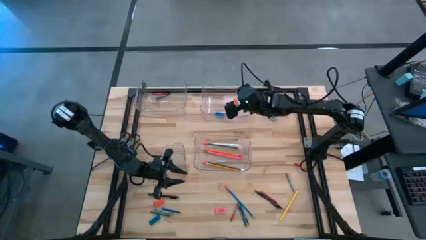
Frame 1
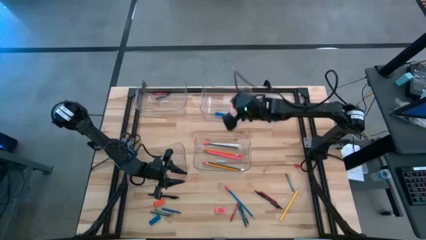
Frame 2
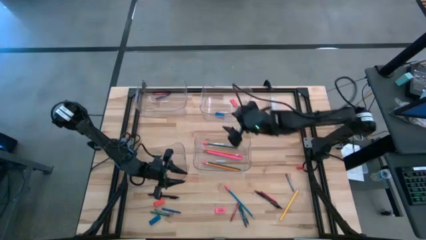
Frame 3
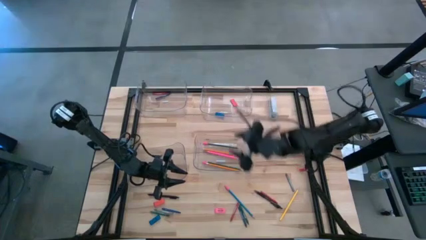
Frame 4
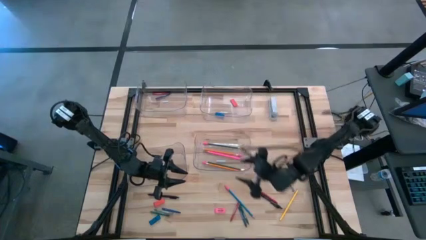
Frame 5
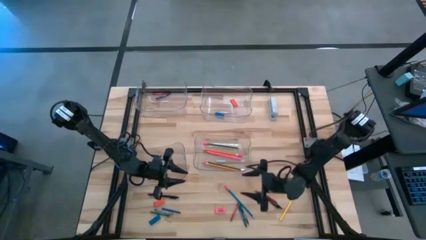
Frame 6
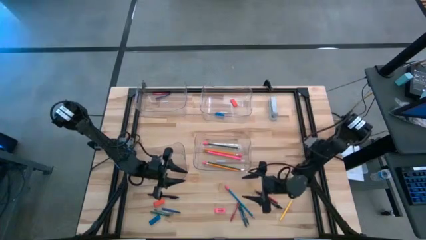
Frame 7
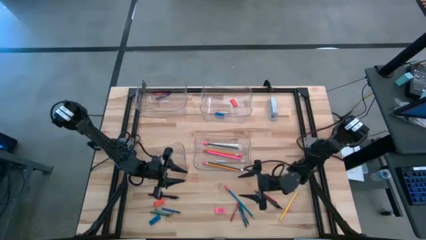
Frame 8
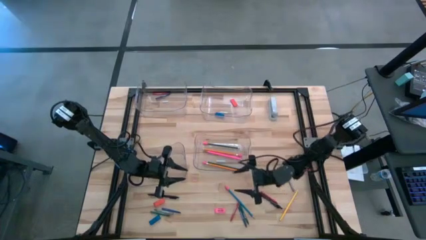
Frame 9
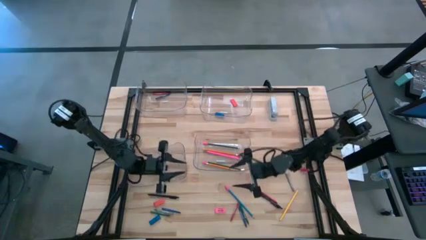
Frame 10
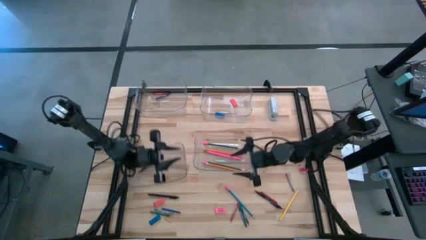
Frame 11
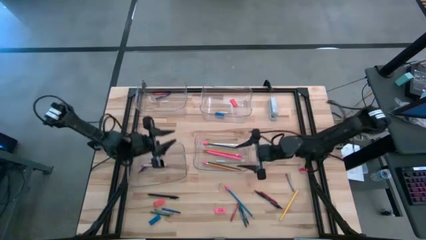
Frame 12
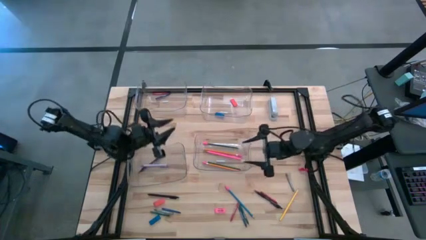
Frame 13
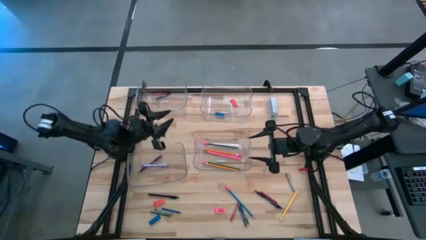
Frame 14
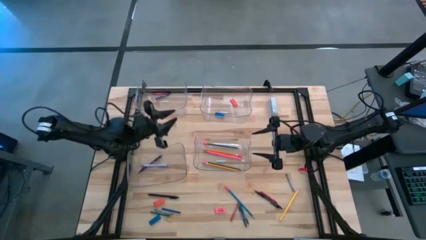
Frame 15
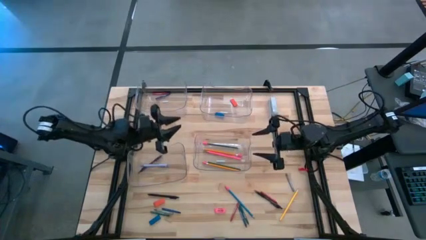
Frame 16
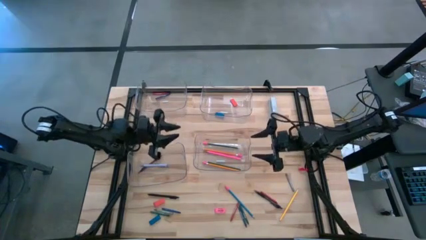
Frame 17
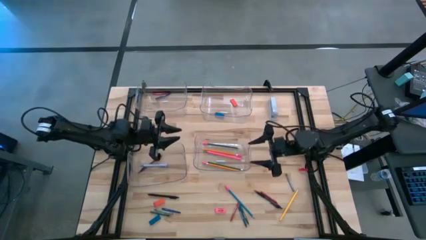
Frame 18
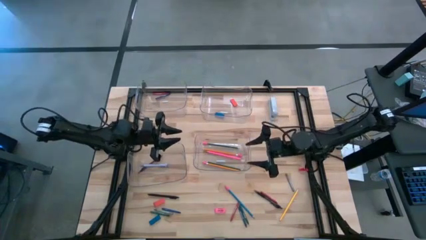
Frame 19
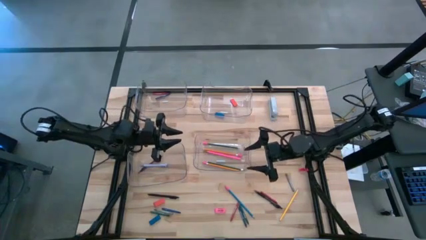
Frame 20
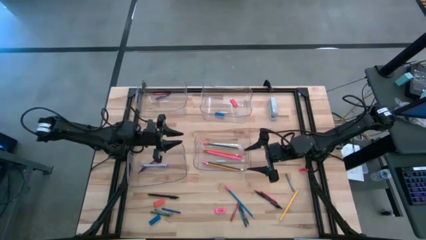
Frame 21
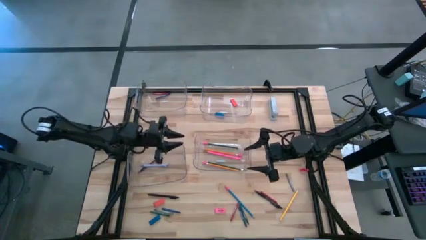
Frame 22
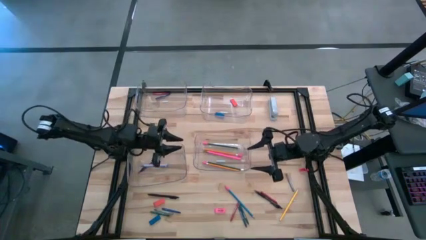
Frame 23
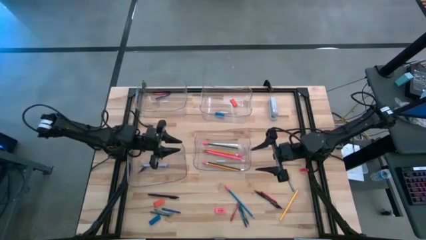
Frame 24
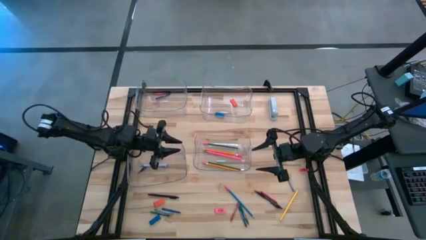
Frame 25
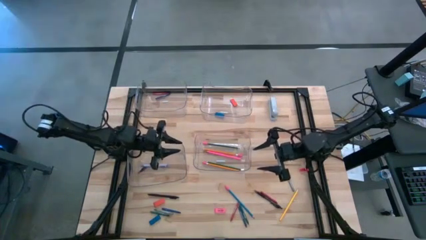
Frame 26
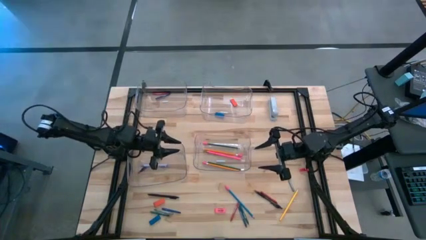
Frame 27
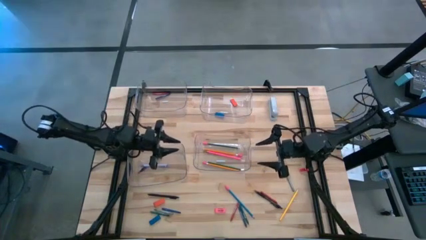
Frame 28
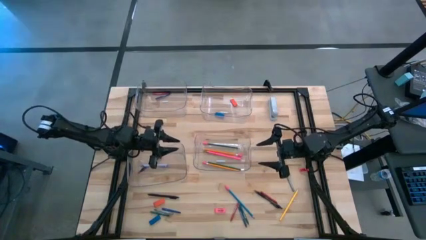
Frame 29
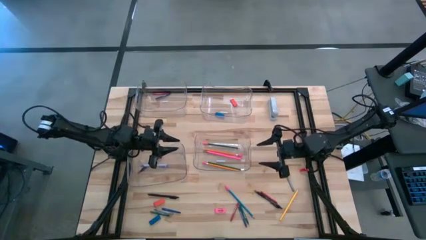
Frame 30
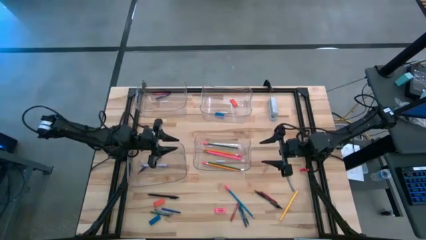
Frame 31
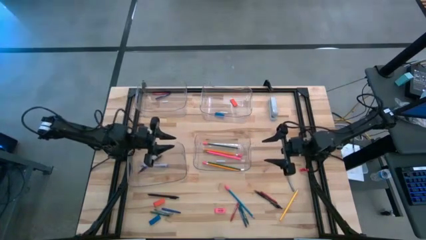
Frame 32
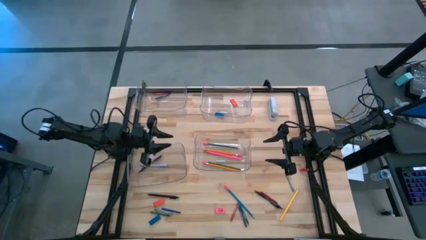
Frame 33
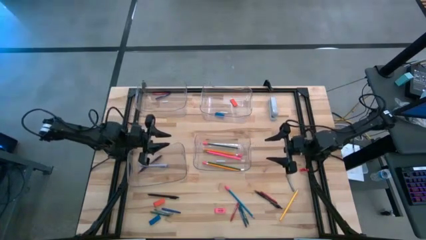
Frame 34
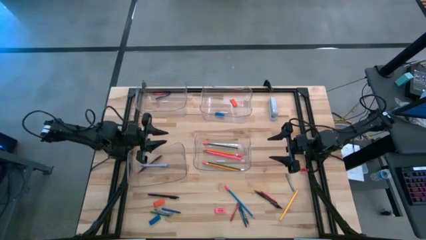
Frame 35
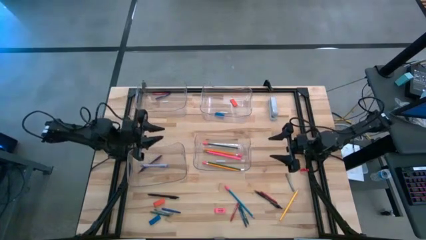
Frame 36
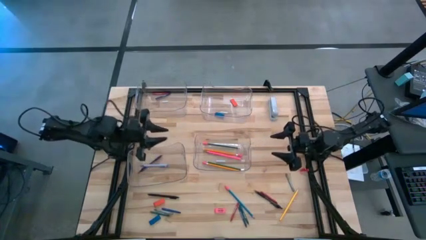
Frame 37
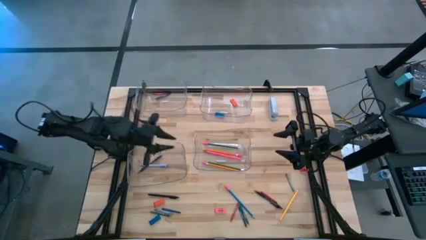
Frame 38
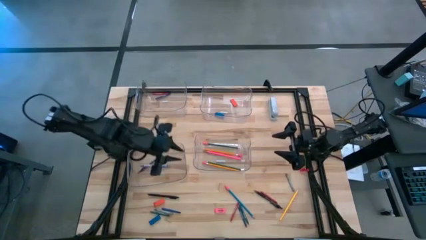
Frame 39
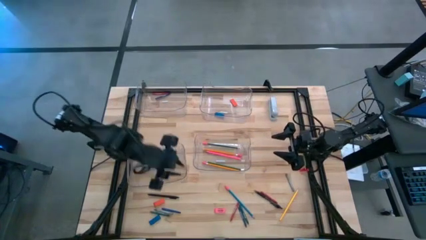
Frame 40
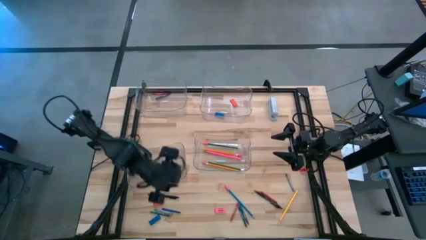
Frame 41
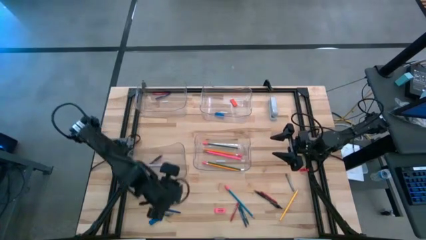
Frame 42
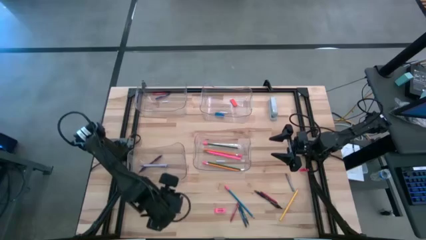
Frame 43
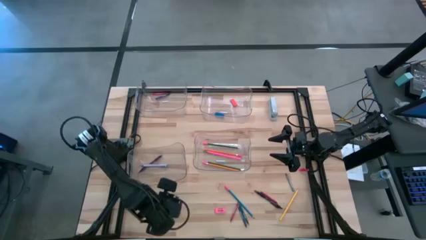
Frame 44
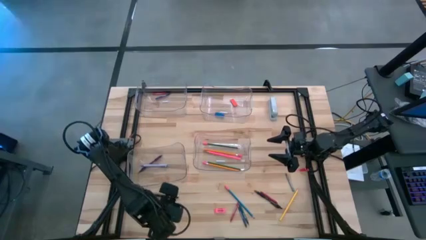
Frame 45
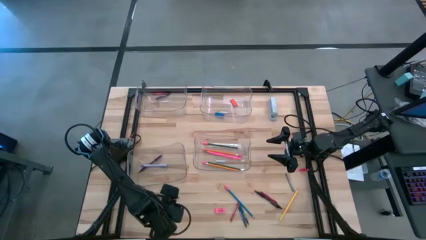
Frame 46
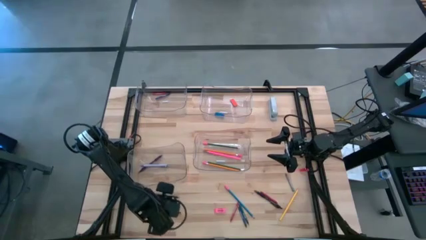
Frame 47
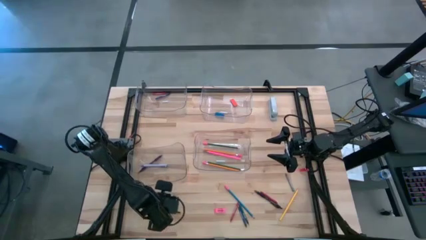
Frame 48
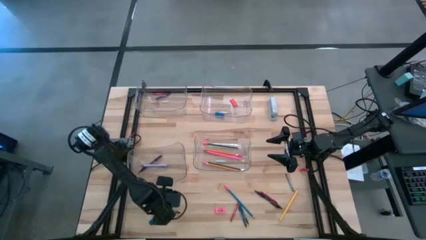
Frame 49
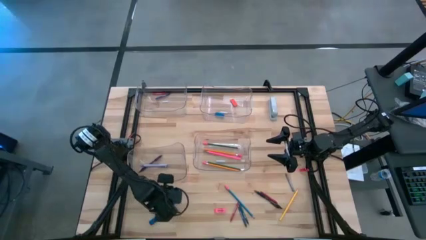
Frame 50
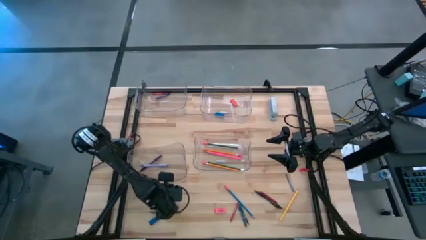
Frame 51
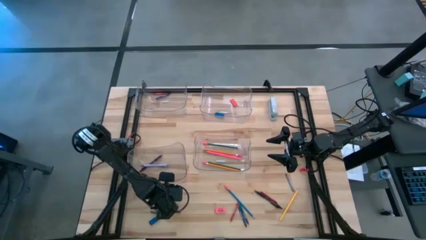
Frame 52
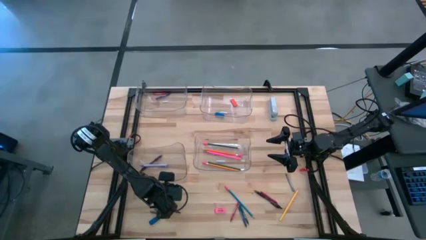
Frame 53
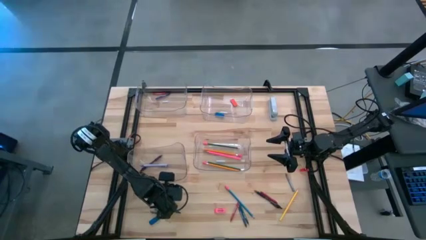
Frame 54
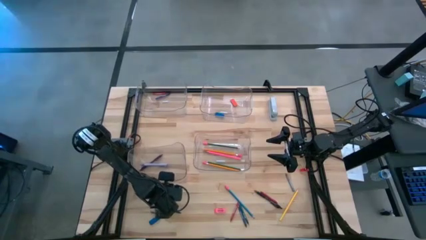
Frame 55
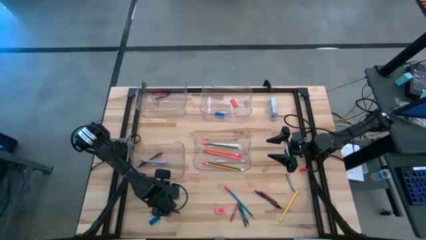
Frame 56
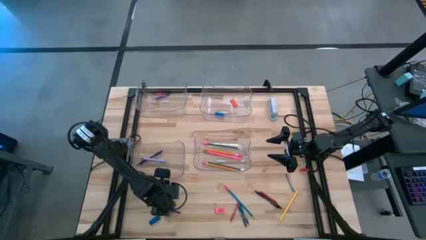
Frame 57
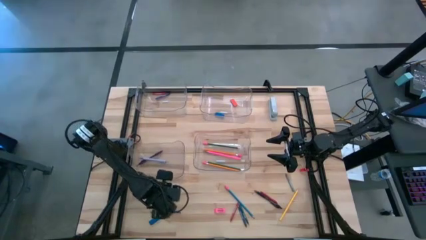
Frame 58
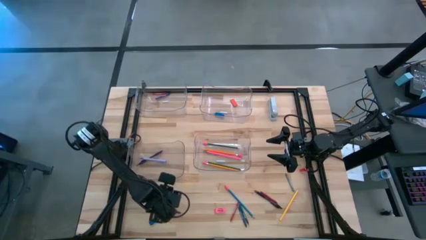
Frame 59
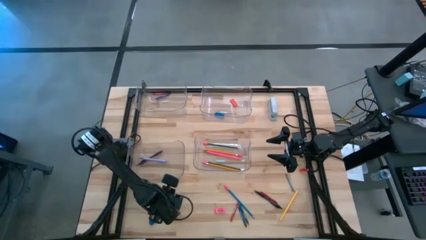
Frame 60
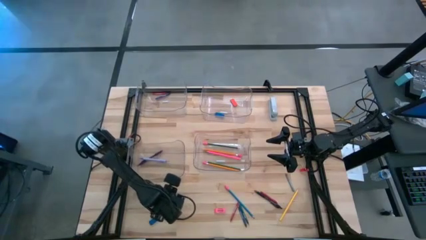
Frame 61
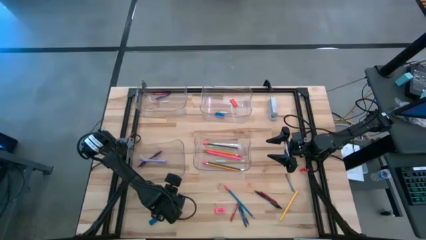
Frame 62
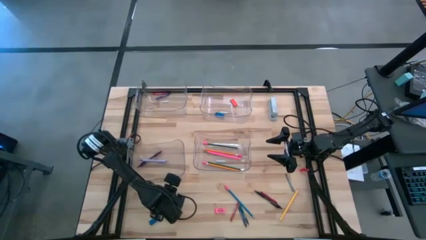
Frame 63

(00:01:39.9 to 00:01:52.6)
Task: Sort crayons/erasers/pens/pencils in bins
Put the left black pen into the bottom left transparent bin
